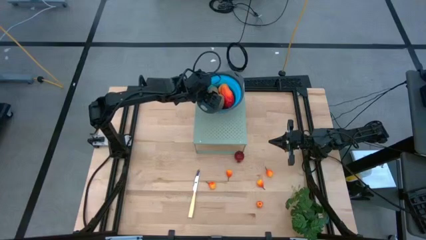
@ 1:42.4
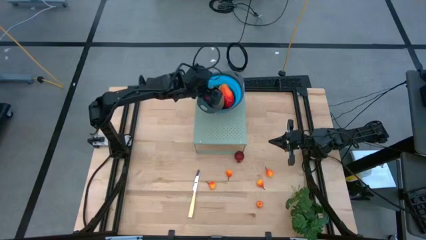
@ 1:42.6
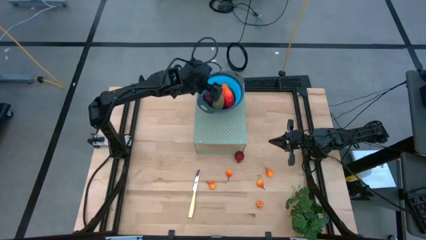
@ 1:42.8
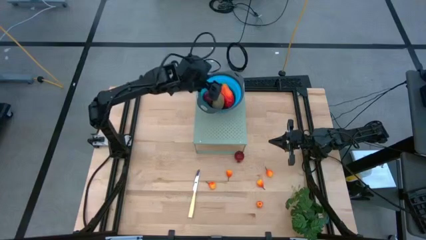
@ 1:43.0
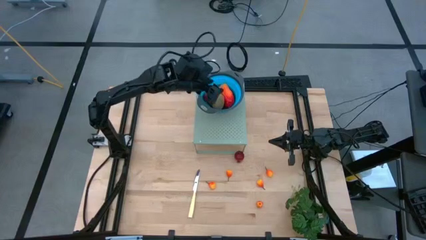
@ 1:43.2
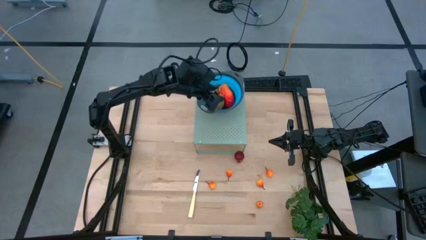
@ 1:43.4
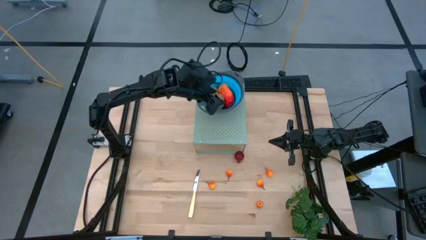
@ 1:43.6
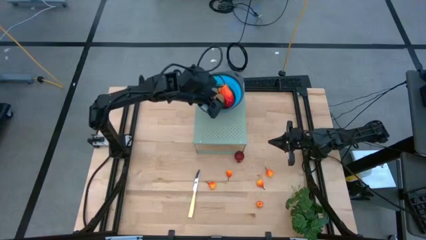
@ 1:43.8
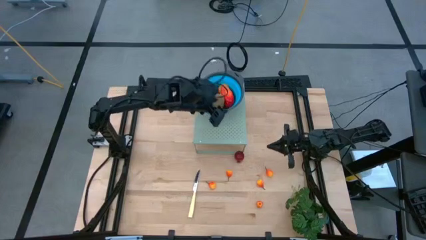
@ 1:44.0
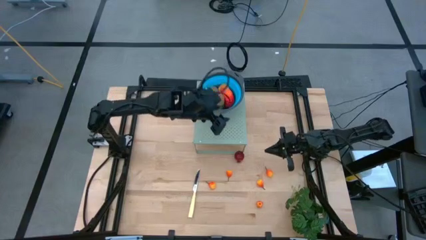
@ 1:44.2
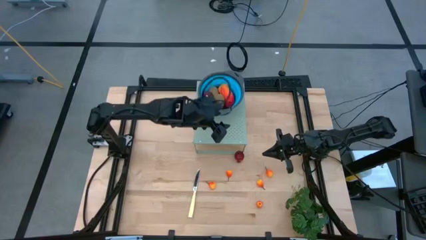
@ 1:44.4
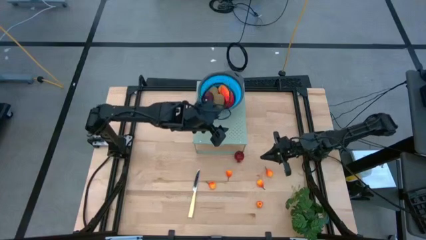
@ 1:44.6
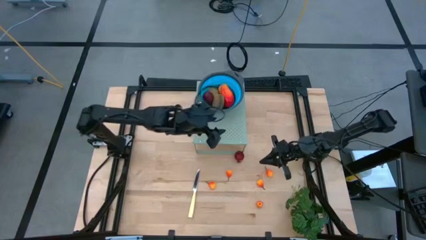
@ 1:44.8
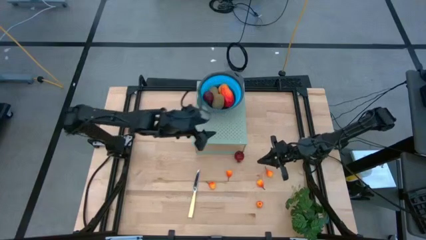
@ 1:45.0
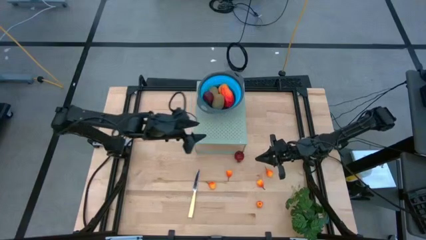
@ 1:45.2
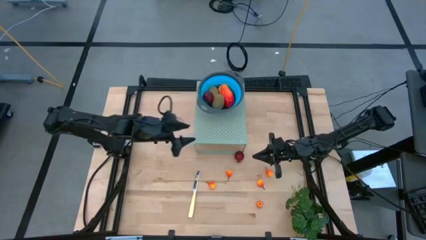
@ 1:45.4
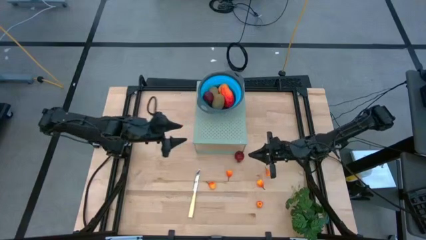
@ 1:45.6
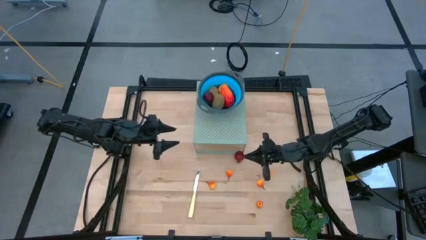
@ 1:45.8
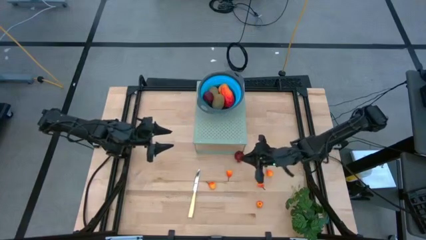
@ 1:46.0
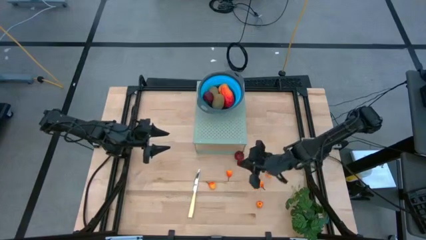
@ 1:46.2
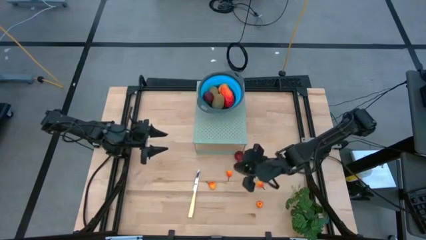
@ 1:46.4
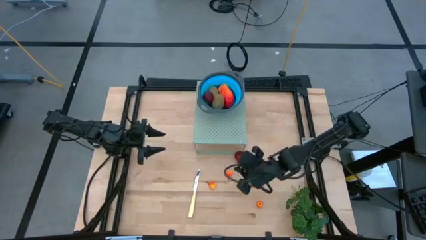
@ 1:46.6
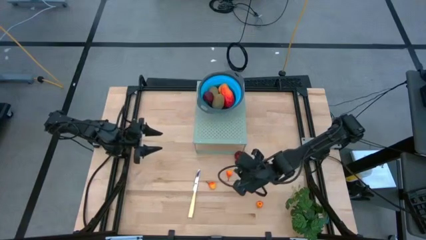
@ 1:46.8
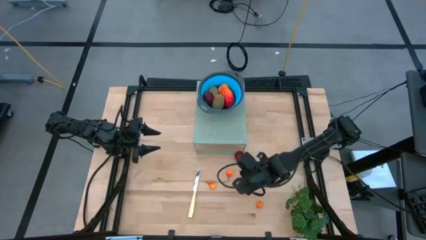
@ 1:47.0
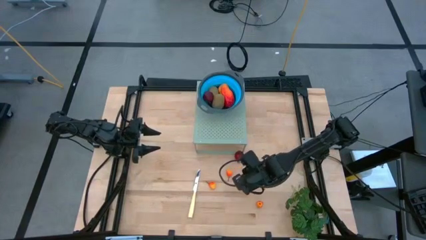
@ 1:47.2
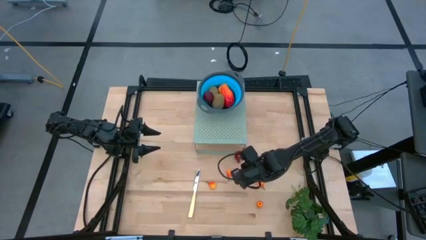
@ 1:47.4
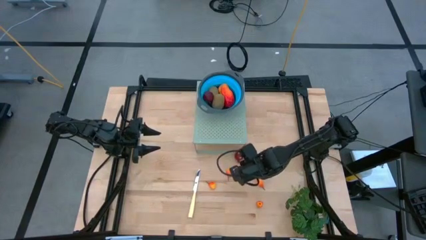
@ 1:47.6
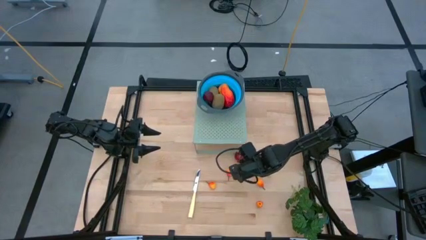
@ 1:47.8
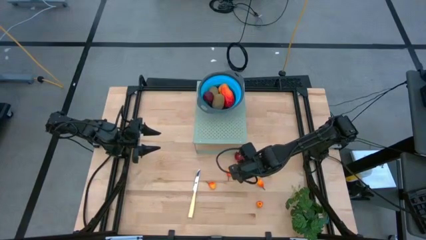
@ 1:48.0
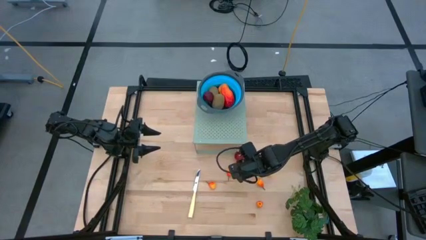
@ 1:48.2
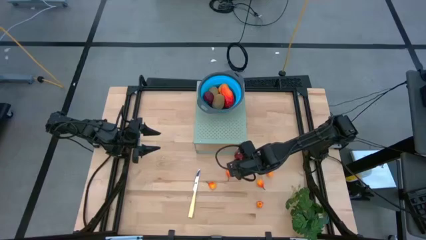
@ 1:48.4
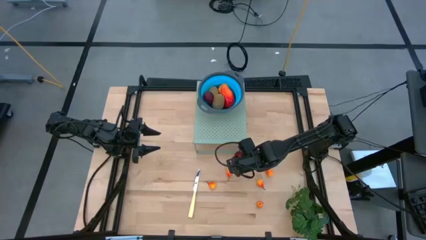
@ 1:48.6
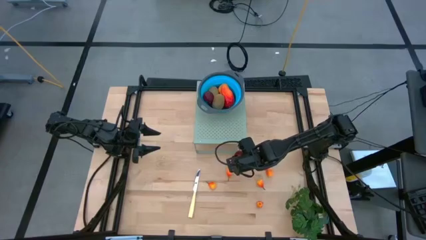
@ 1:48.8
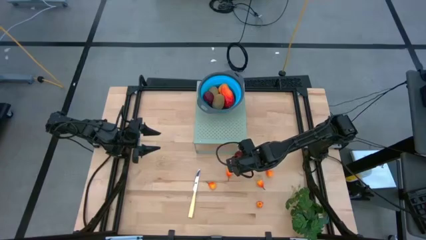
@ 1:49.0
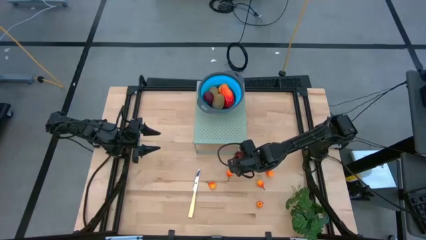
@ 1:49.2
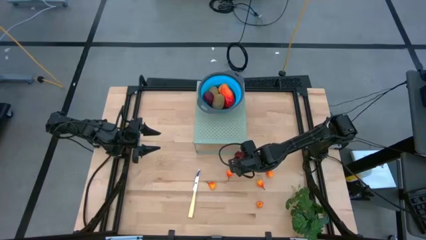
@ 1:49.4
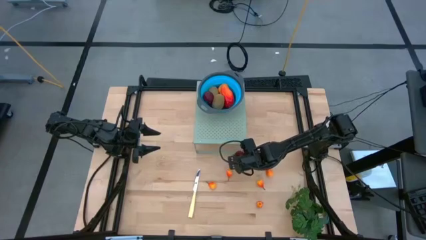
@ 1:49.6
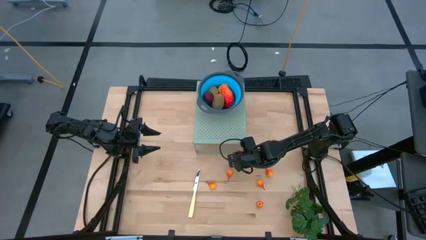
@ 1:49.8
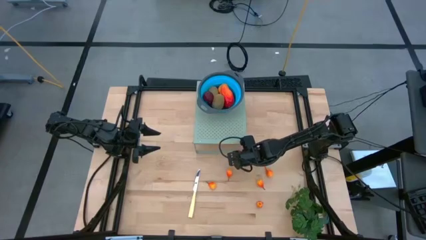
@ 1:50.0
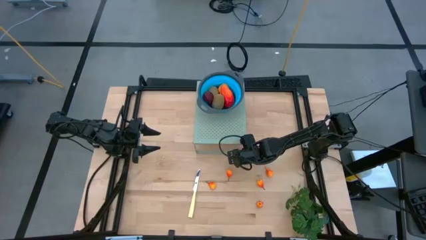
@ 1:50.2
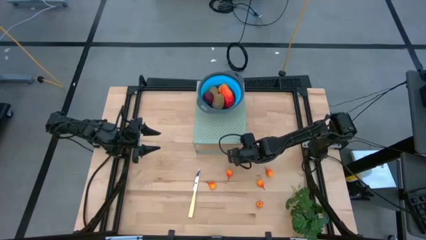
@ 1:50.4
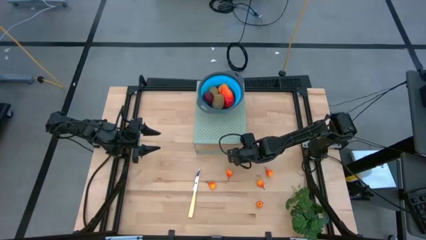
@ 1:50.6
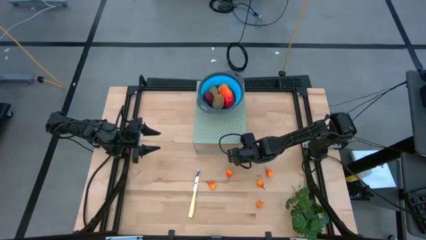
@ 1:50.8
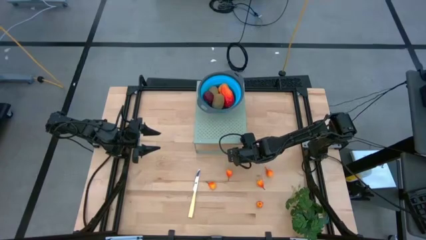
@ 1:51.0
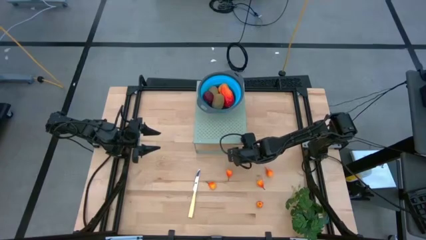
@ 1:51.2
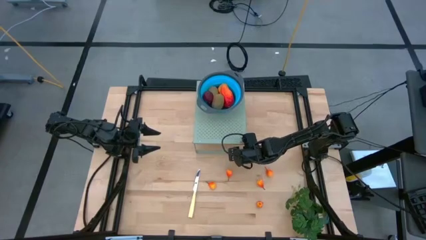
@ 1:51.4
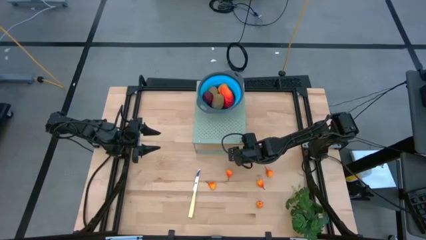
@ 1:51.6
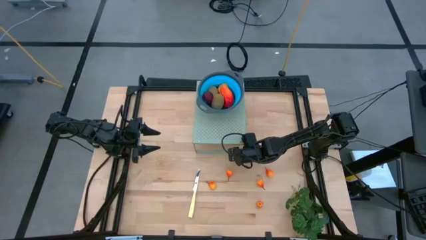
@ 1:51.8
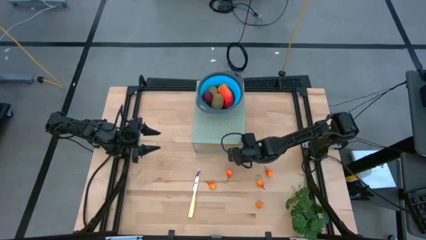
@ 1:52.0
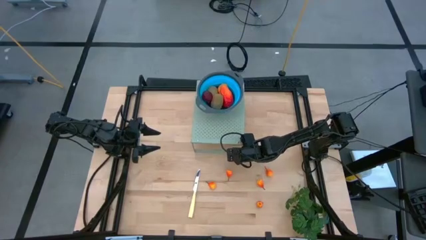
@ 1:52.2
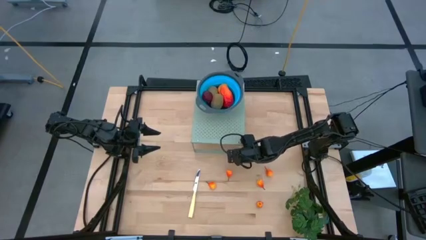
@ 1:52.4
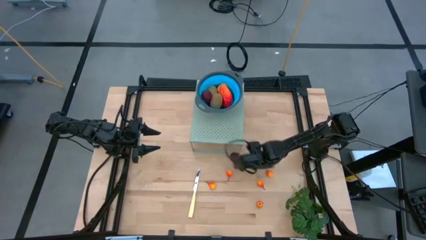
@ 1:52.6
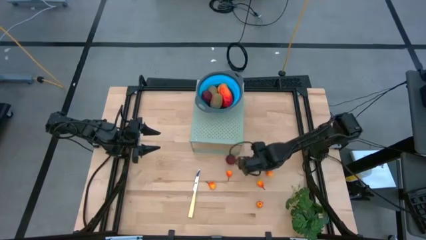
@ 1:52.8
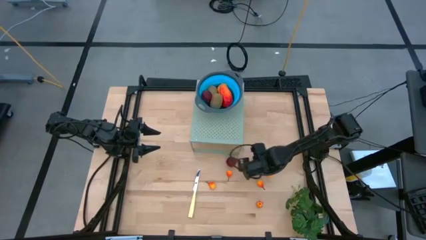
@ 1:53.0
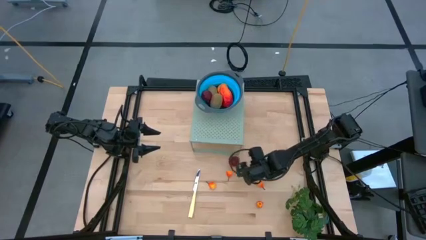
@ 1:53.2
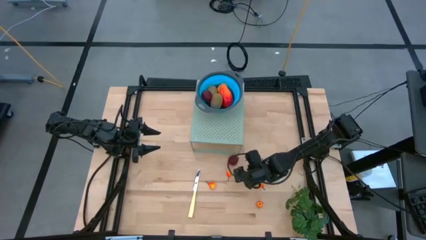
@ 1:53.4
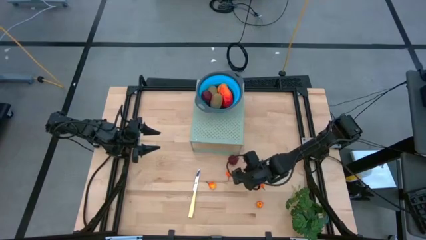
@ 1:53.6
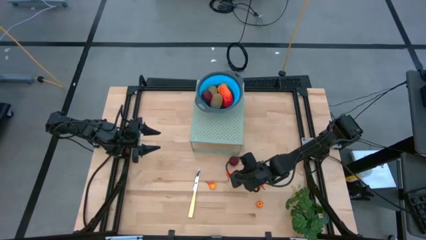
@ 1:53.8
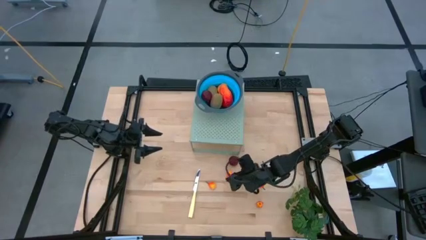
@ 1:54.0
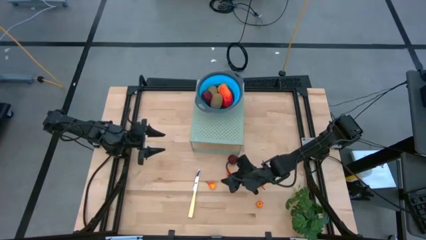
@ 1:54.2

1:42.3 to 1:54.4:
Task: Pick & Place Fruit
Put the pomegranate into the blue strainer bowl on the shelf
